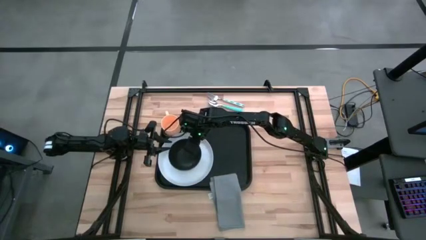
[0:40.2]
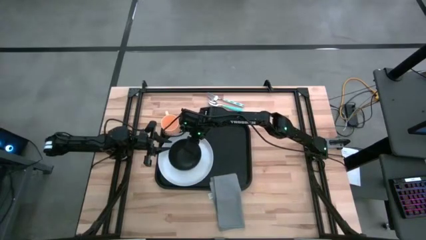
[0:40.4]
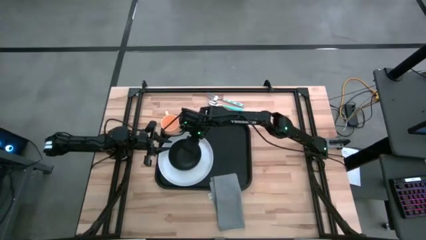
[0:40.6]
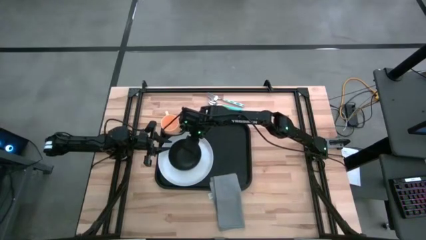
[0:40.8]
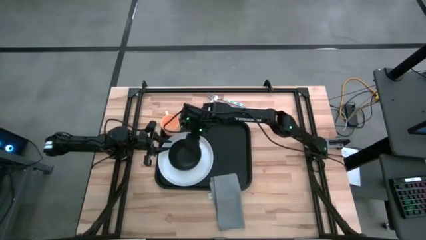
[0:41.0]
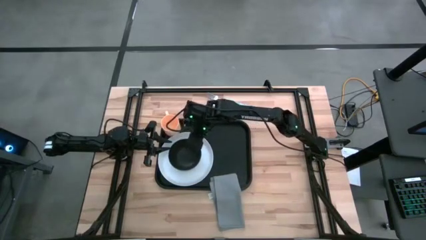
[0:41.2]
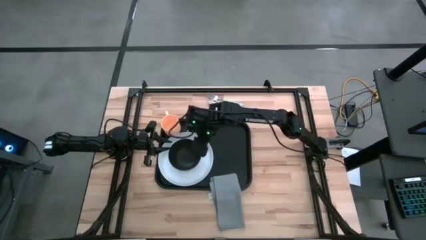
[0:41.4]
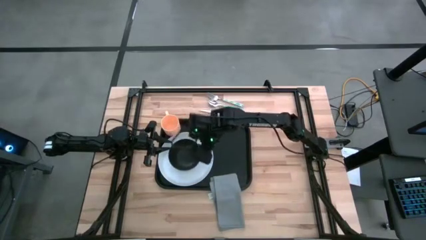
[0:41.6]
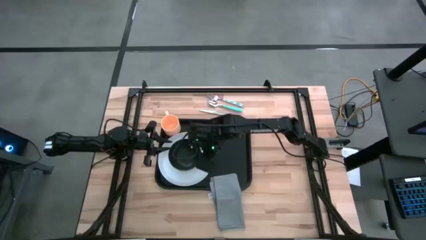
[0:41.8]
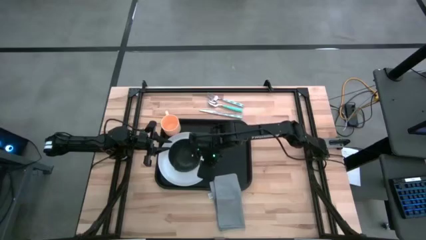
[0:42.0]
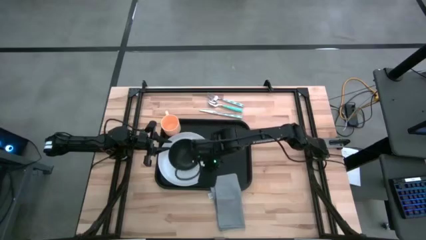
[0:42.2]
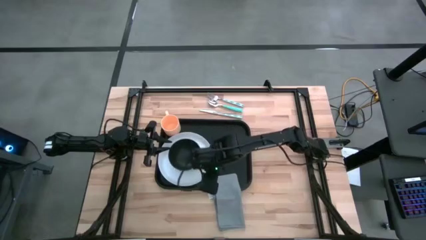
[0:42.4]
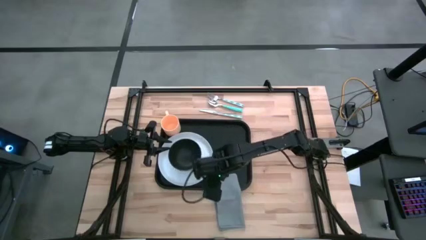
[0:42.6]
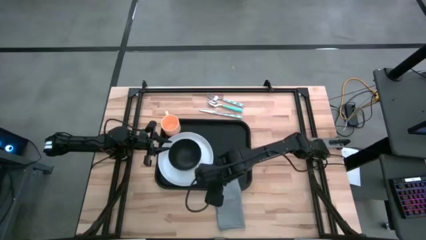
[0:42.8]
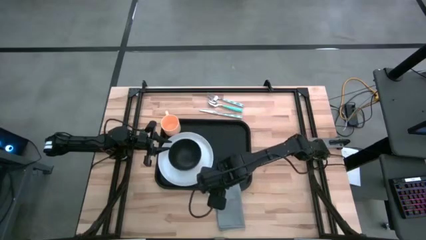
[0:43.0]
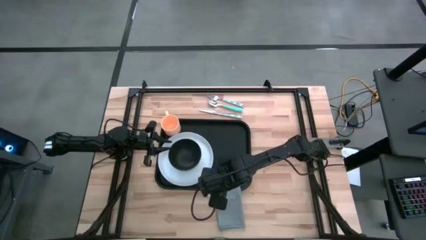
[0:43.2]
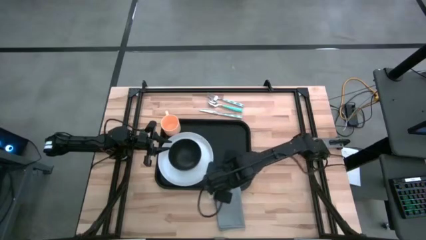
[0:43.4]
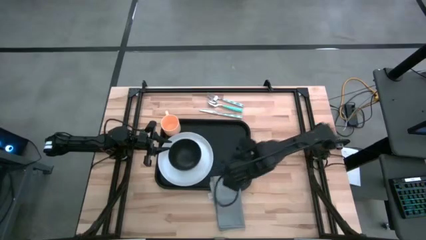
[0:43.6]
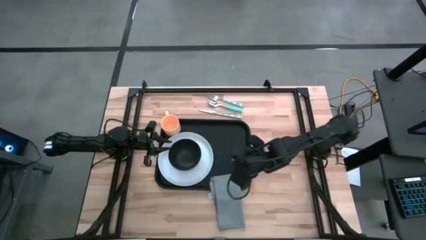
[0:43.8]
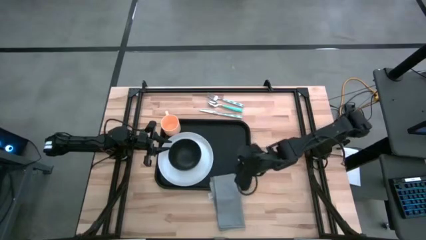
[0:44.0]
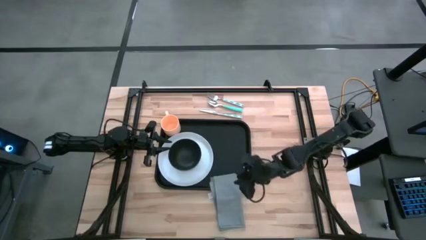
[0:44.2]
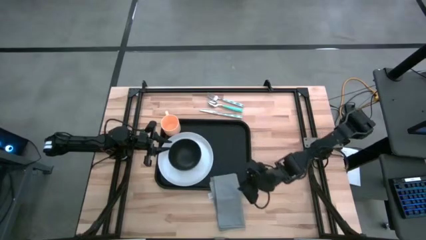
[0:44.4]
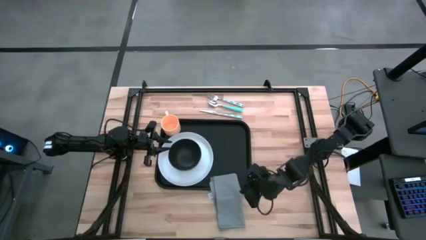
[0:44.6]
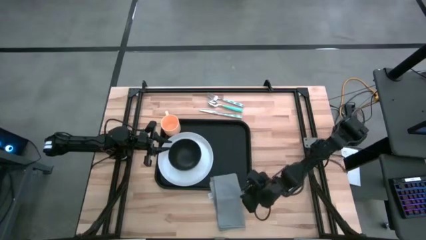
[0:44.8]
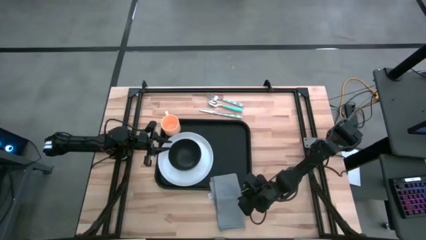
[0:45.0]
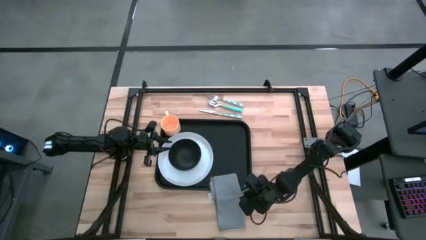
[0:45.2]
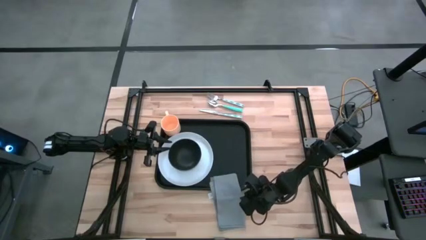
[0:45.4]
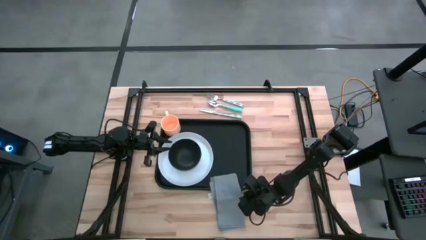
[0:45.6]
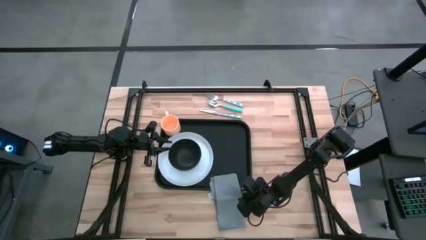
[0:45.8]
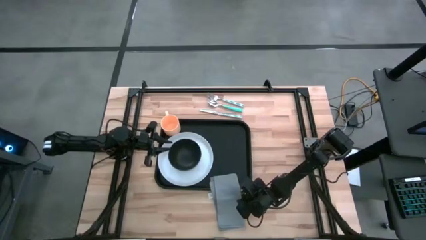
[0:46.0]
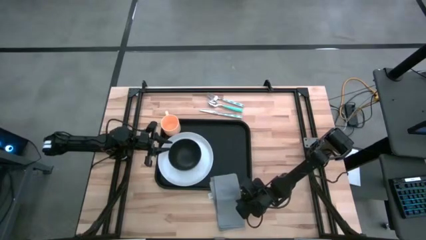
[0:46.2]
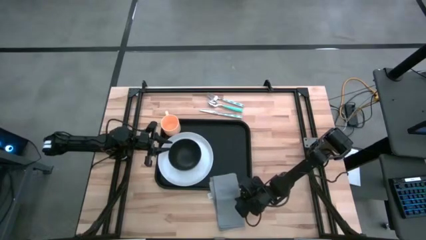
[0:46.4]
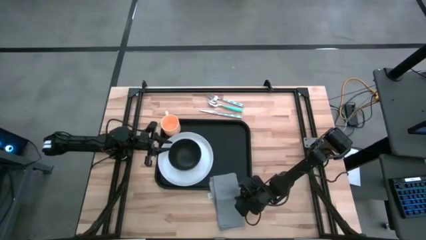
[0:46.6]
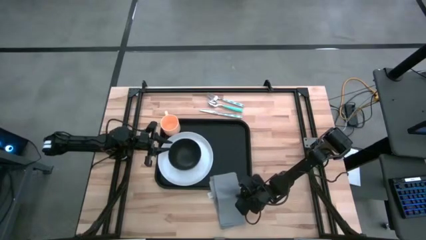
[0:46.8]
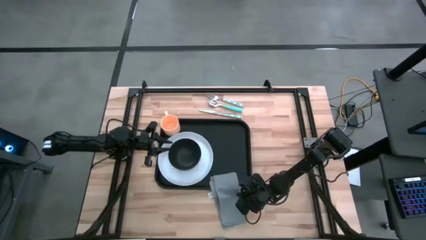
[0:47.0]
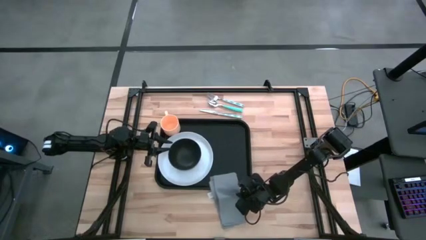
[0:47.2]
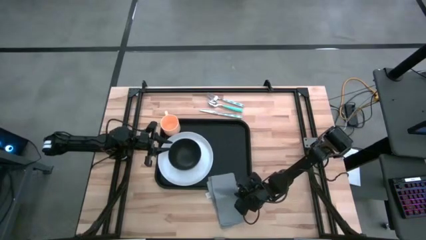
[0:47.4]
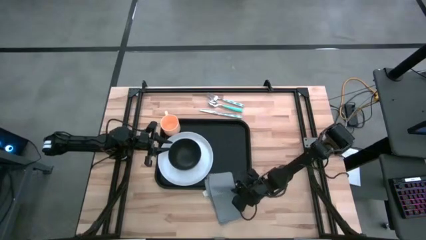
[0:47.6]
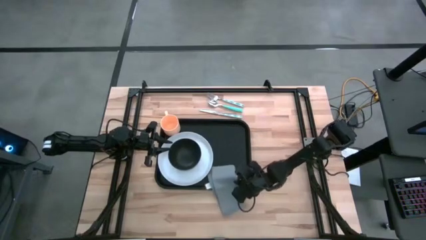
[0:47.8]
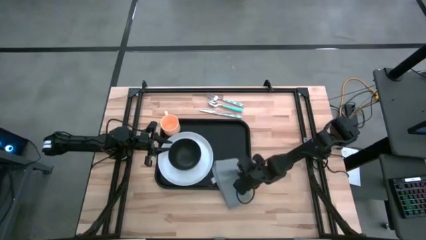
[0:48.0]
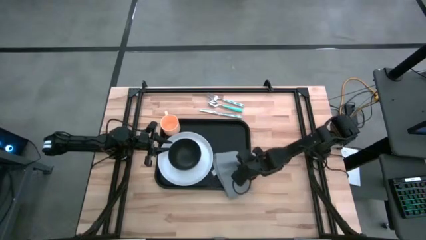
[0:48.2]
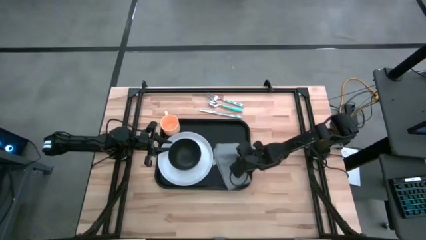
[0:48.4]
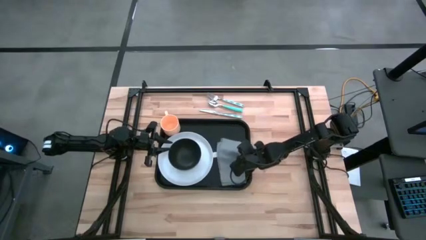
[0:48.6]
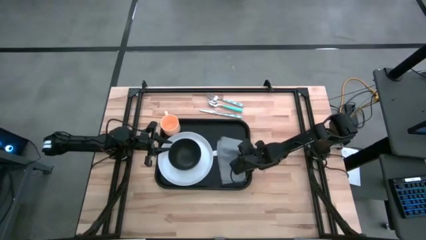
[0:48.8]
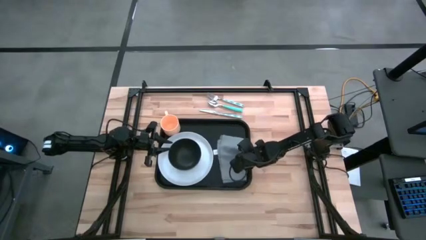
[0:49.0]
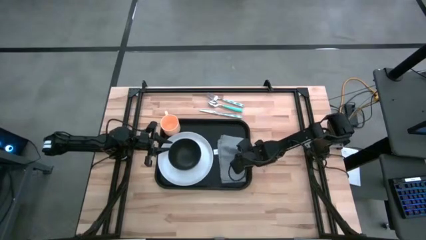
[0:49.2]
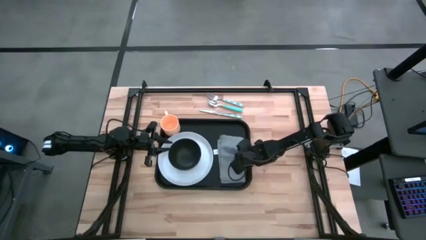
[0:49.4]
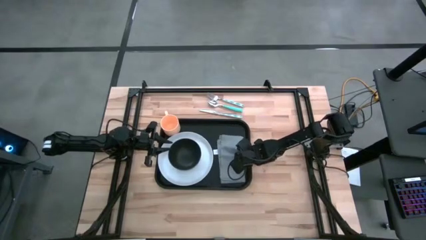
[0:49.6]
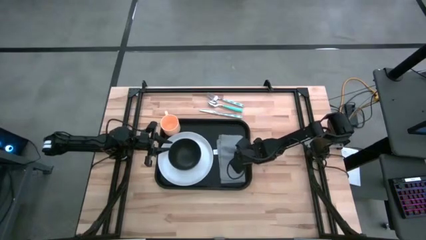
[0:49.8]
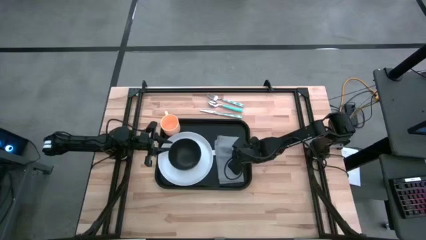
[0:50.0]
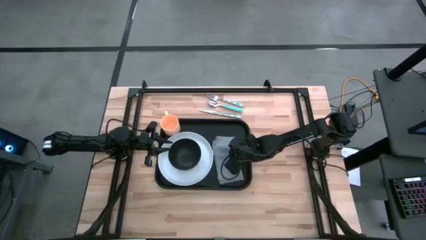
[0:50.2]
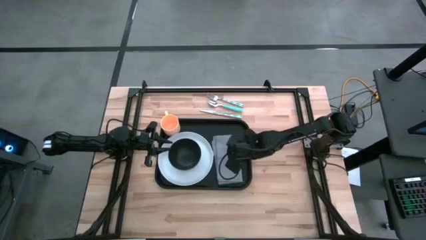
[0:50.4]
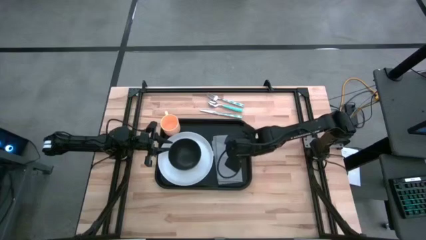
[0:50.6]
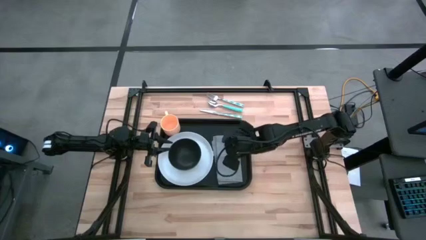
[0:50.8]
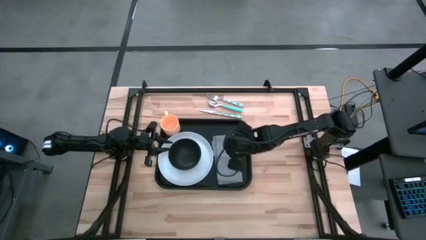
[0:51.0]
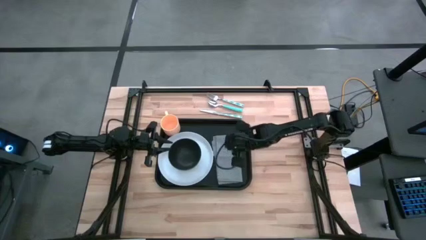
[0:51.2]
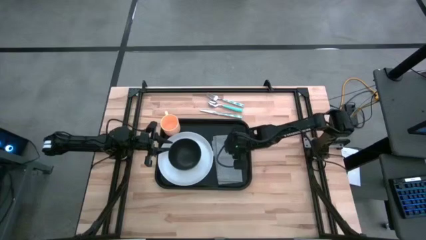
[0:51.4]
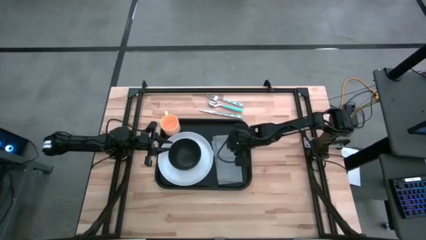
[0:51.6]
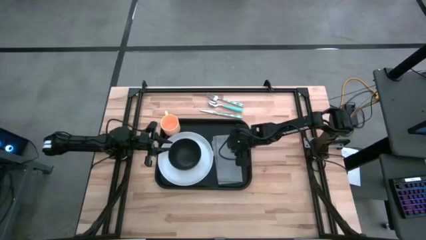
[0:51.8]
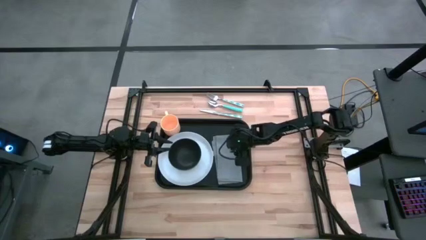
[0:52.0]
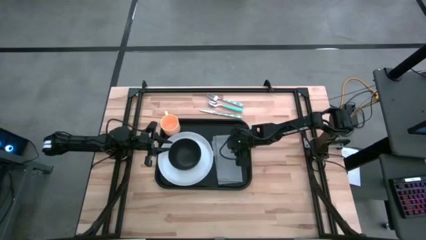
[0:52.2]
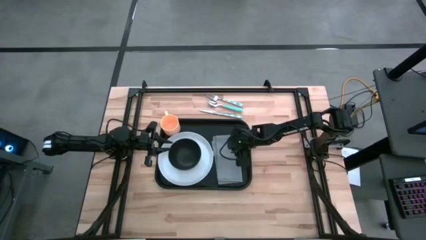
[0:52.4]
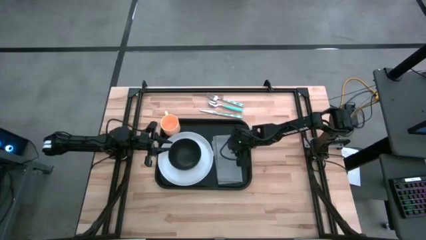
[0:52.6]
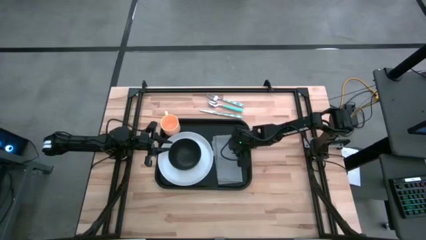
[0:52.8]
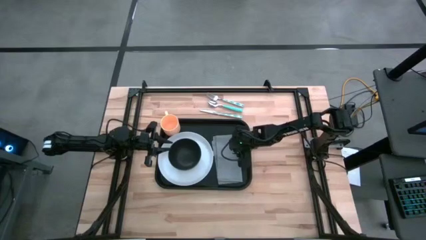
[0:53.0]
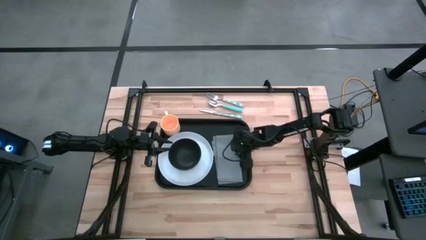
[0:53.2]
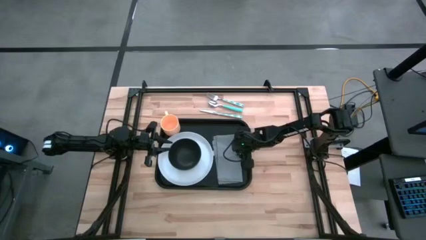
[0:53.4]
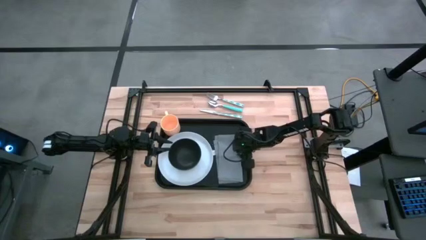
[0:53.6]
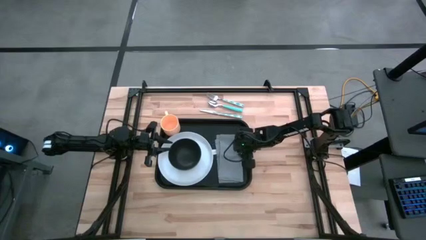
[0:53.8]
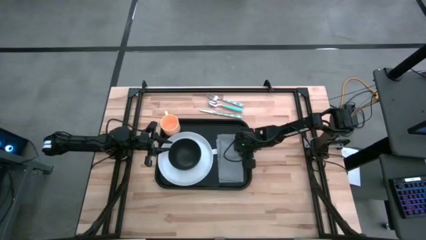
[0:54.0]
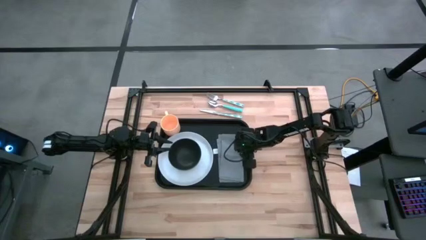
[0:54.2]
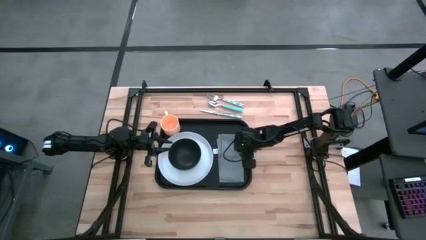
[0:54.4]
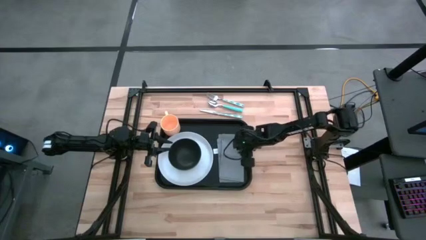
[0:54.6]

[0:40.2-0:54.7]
Task: Set up tray
Put the gray tablecloth on the black table tray to the right of the white plate

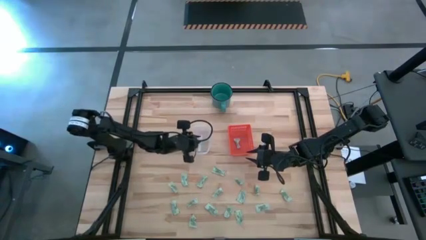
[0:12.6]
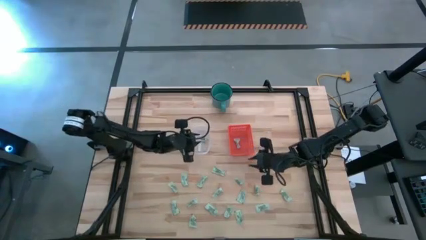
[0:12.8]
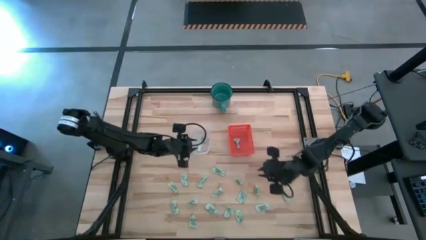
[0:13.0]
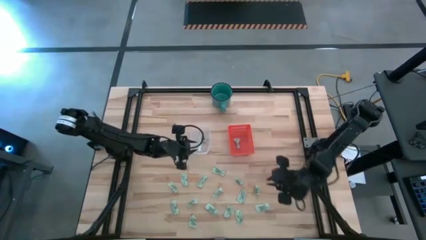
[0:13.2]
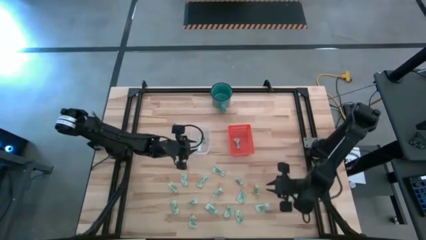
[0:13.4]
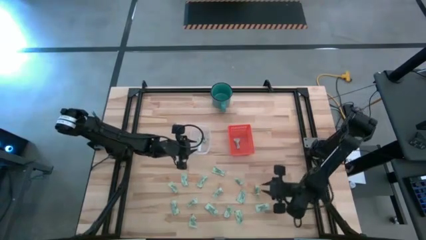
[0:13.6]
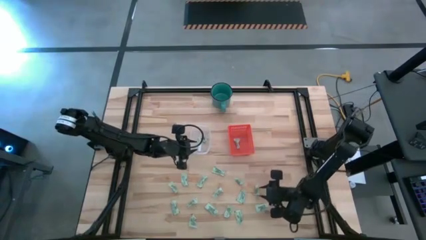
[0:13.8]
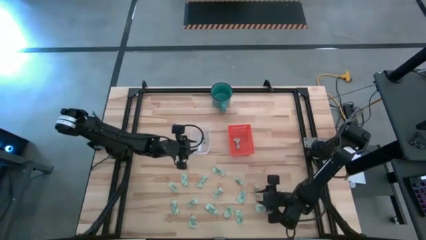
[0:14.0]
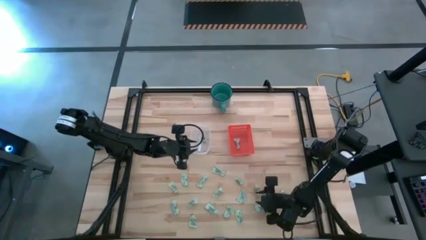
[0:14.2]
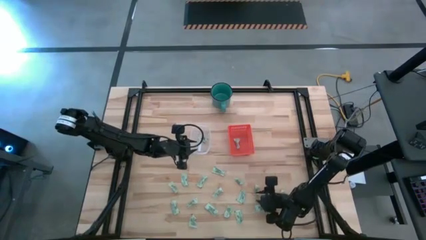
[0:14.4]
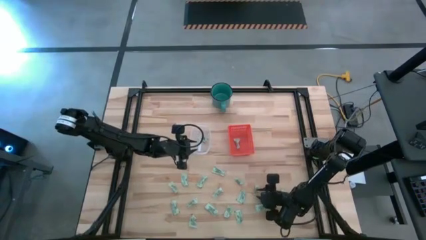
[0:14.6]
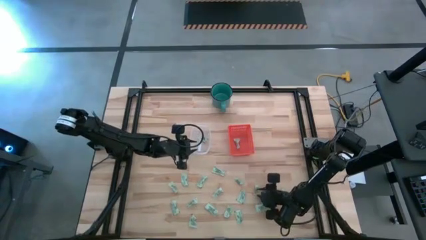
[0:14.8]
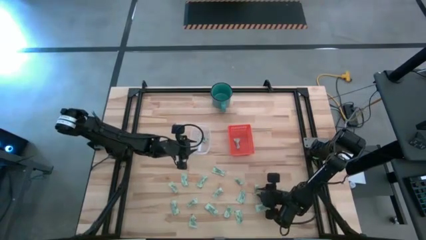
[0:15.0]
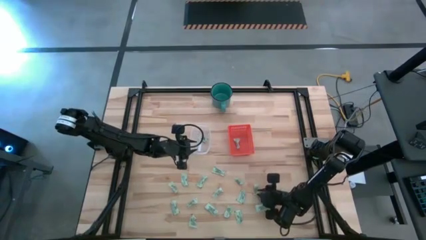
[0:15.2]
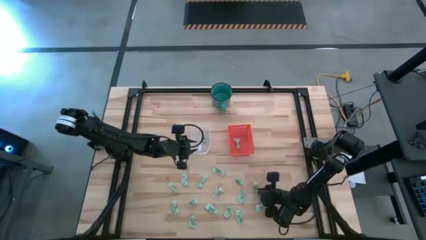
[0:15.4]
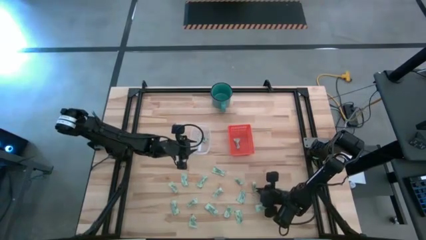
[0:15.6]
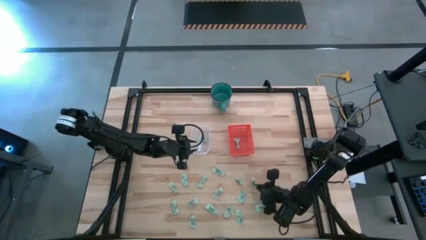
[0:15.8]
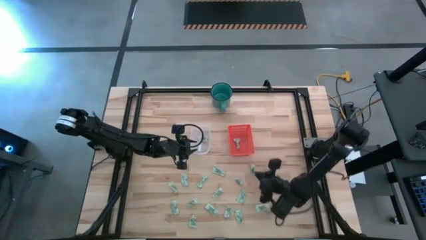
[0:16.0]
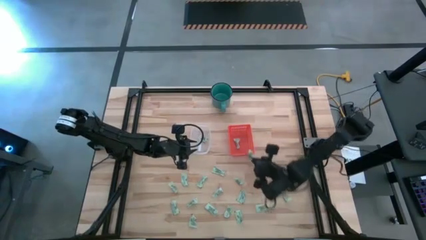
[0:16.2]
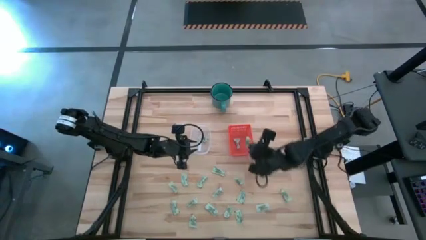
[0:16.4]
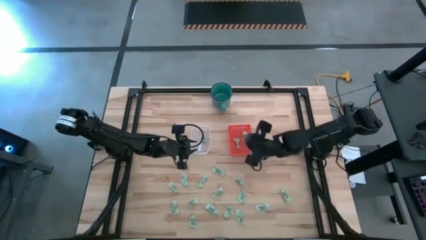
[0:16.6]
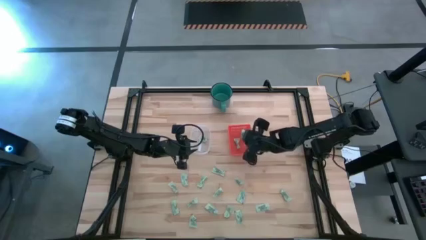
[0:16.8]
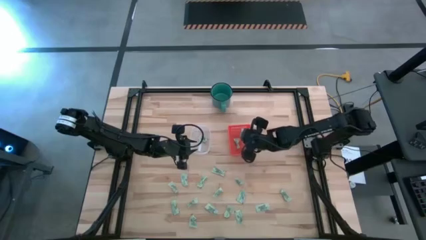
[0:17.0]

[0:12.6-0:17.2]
Task: Pick and place items into bin
Put the stevia packet into the orange bin
